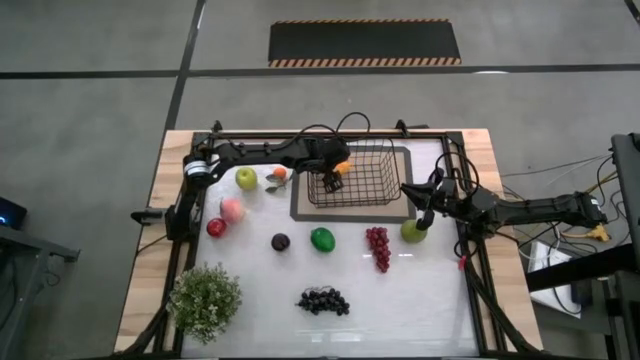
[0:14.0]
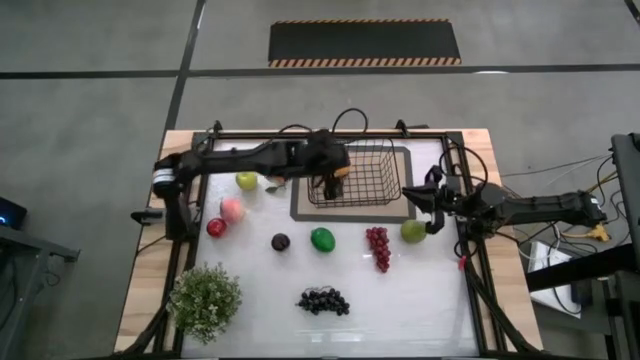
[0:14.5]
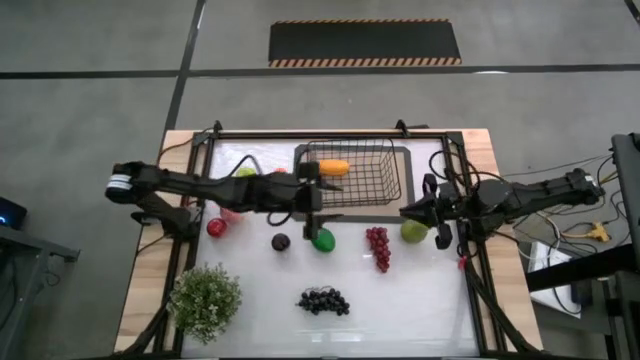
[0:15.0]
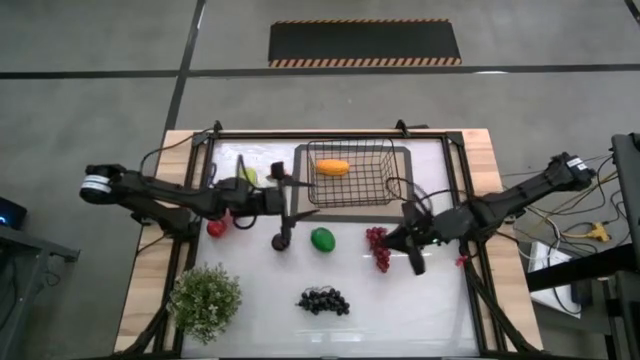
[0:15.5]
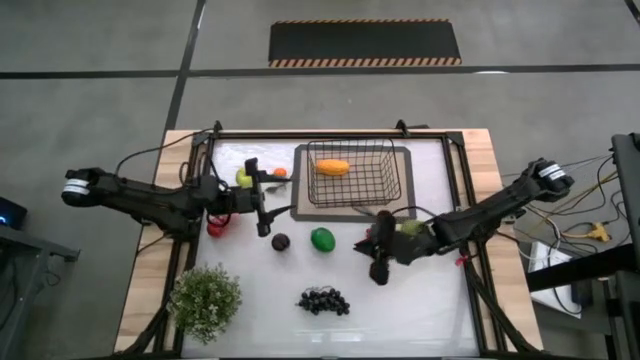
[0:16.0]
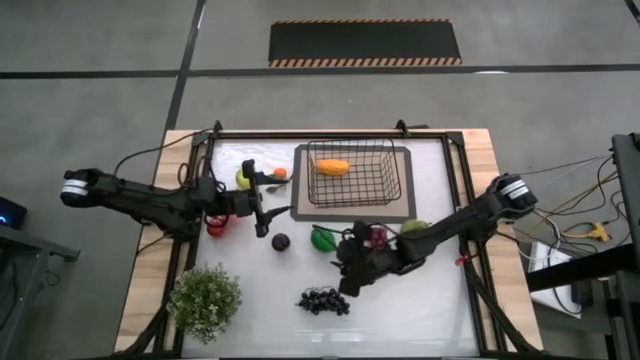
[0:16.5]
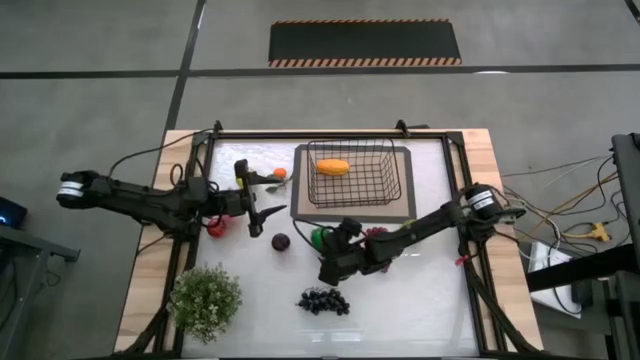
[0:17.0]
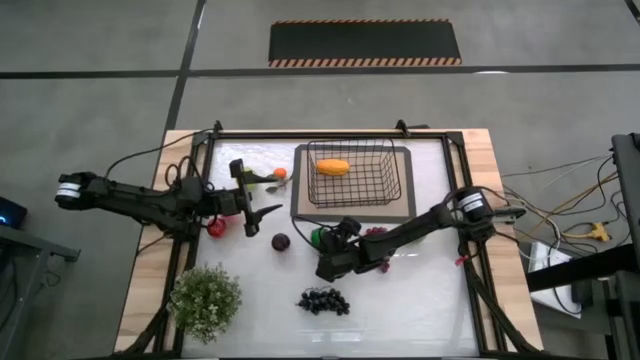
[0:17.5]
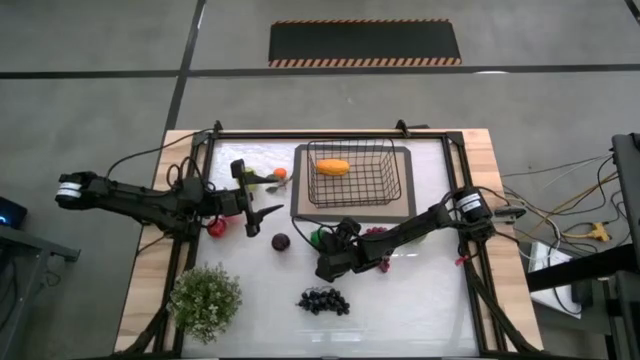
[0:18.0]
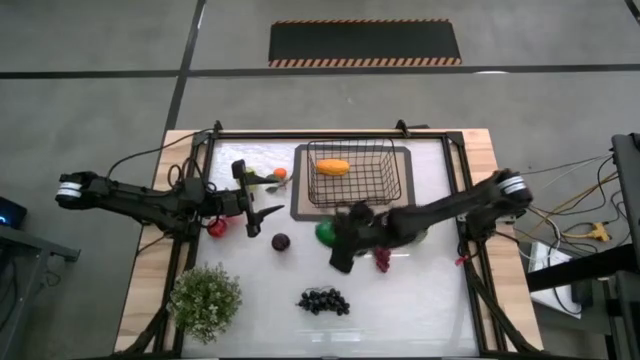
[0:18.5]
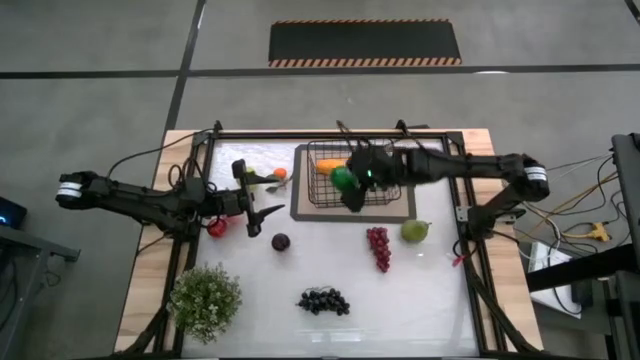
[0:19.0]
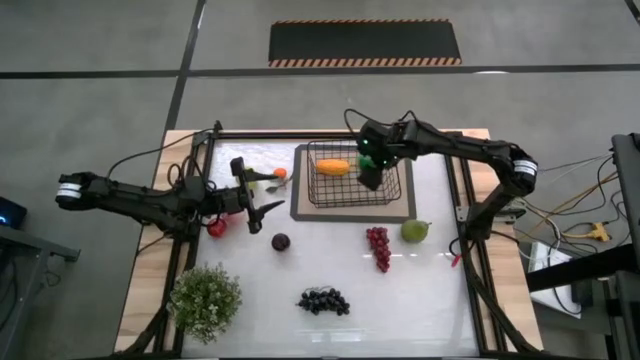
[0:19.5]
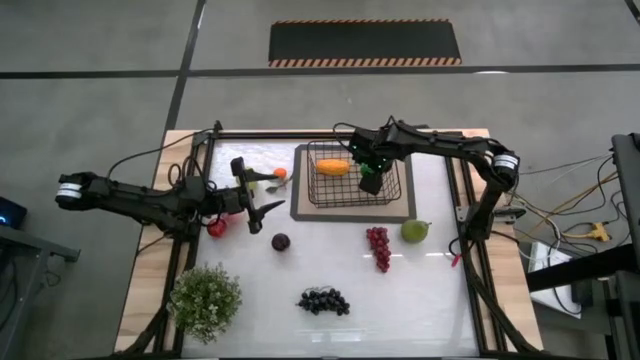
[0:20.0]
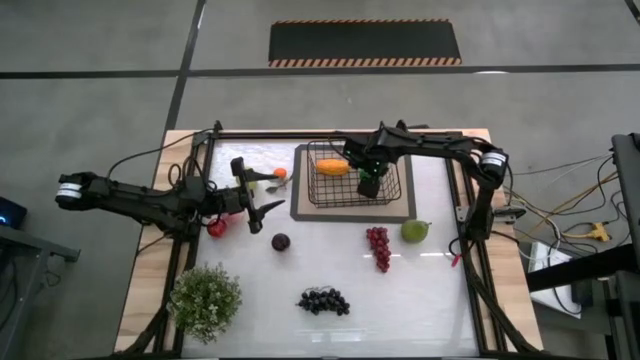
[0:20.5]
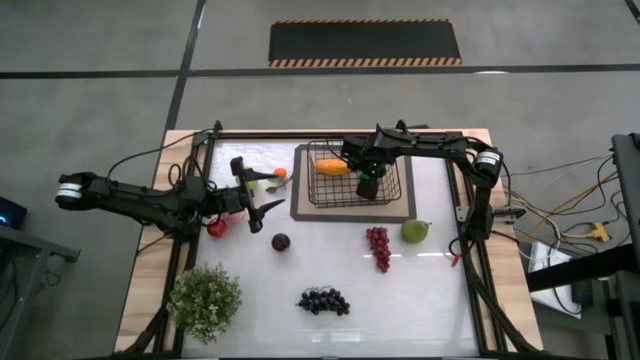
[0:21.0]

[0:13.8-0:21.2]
Task: Build produce basket
Put the green lime into the black wire basket

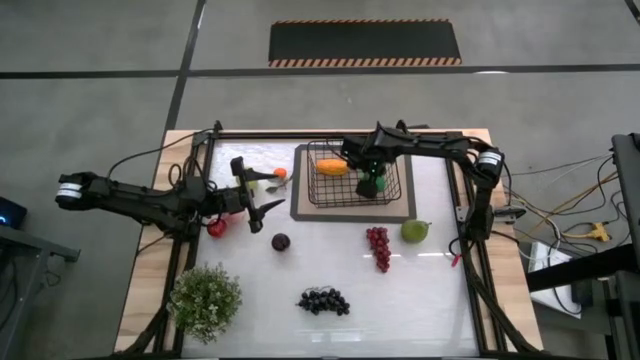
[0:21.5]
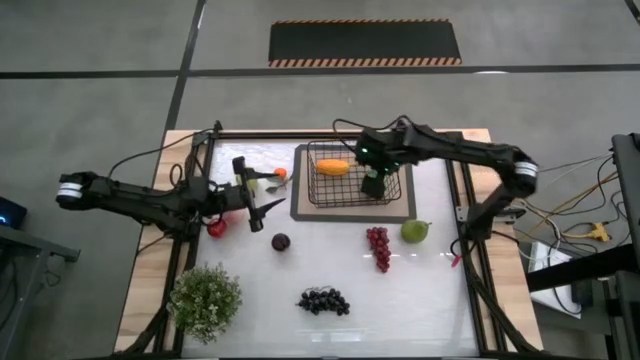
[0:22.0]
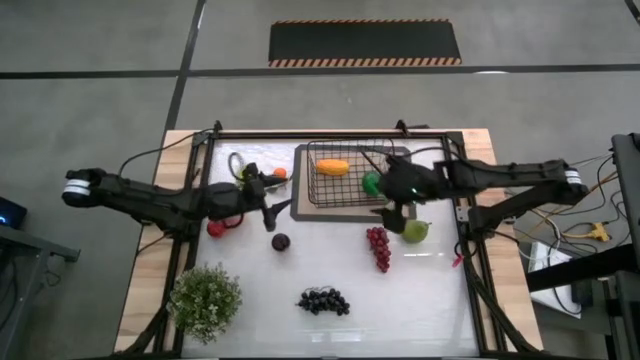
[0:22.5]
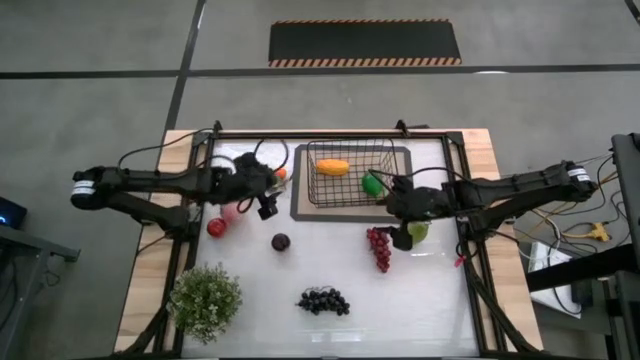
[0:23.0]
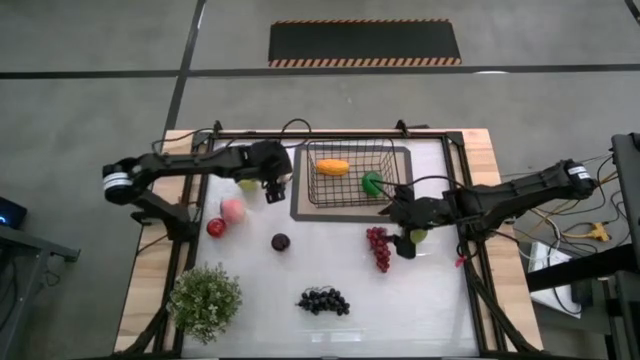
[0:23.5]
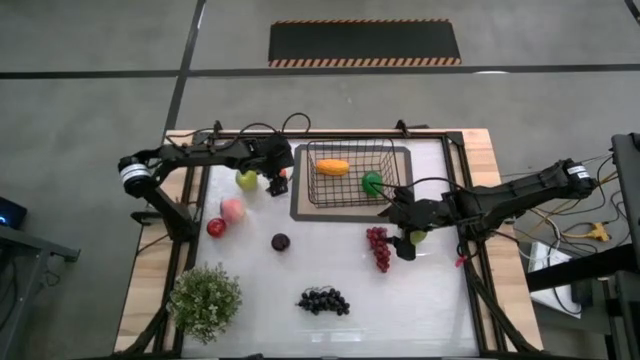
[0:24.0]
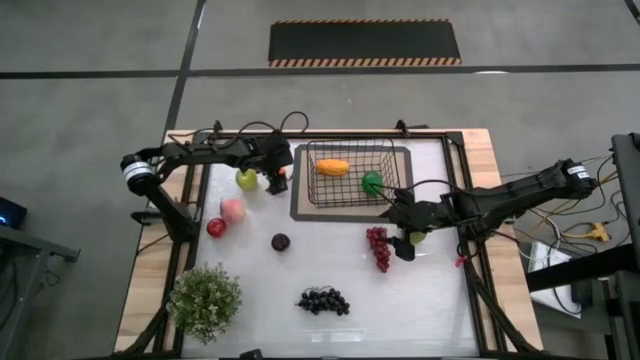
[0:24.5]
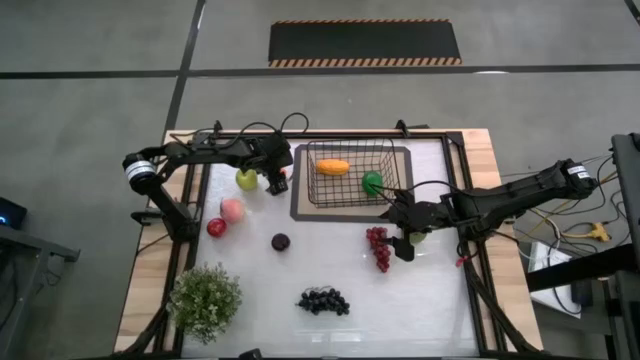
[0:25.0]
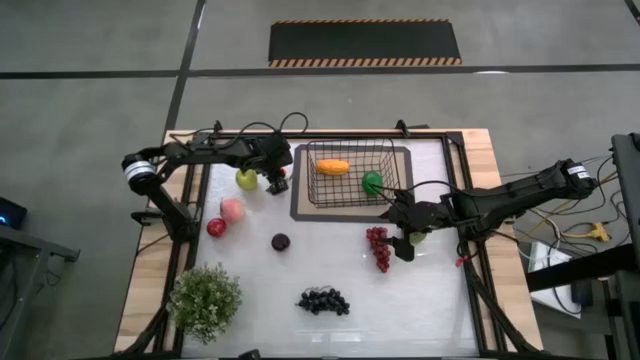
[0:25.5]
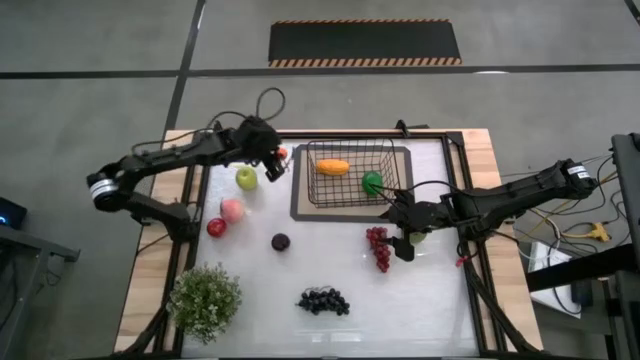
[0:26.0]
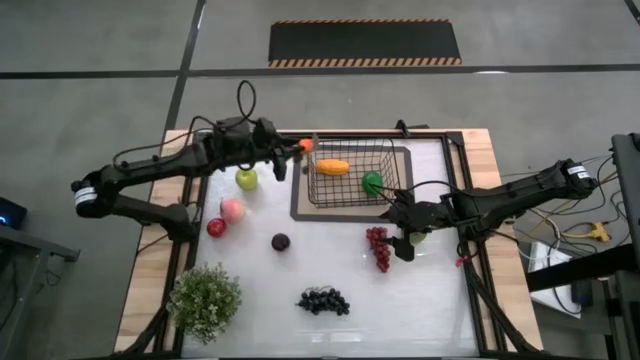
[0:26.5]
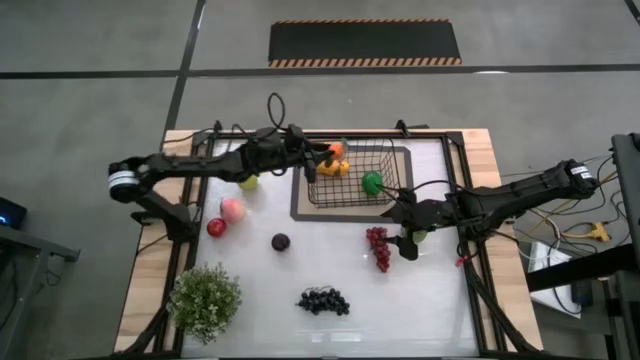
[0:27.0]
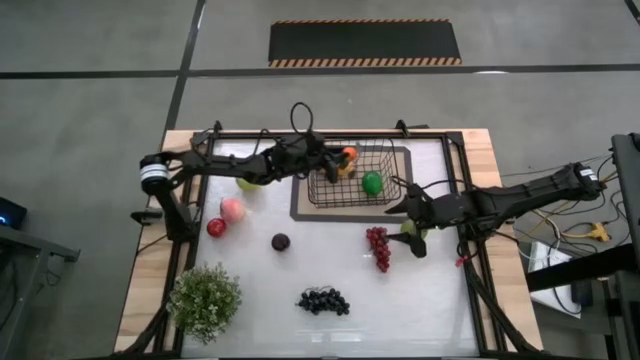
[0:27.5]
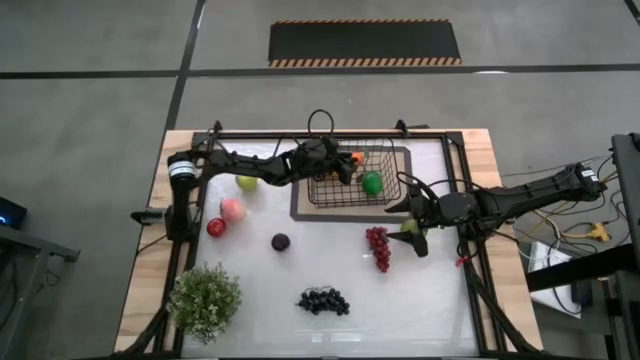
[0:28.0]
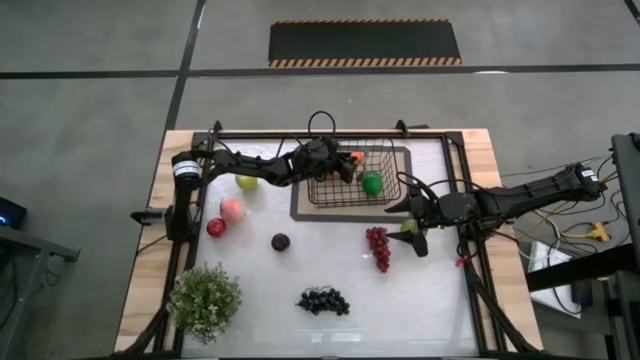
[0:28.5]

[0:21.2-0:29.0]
Put the orange tangerine into the black wire basket

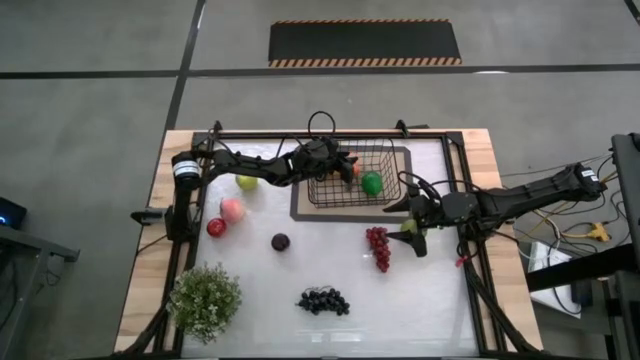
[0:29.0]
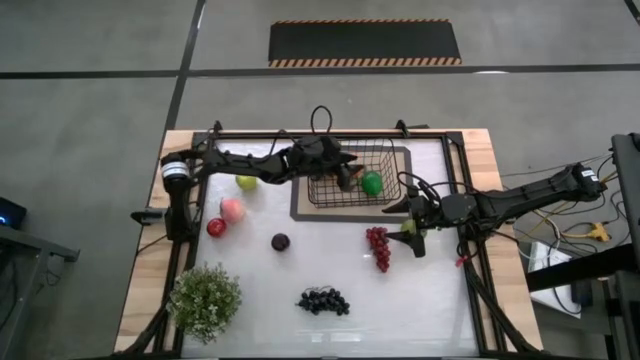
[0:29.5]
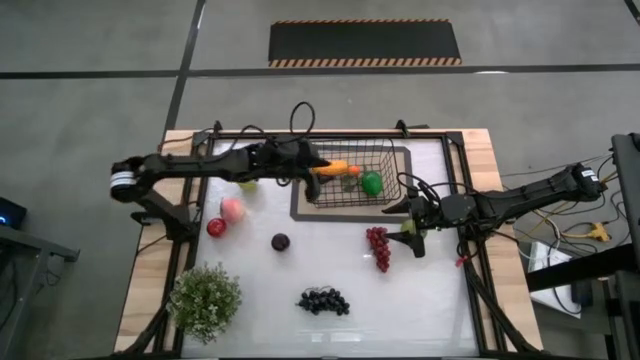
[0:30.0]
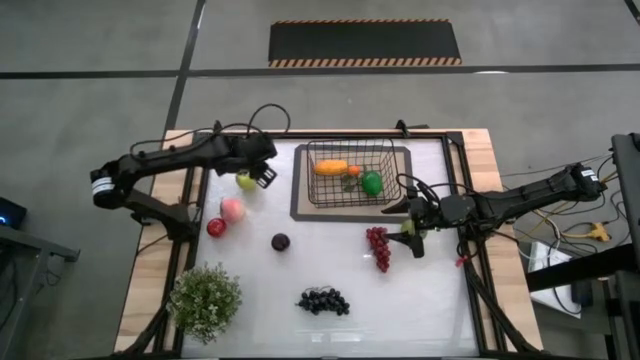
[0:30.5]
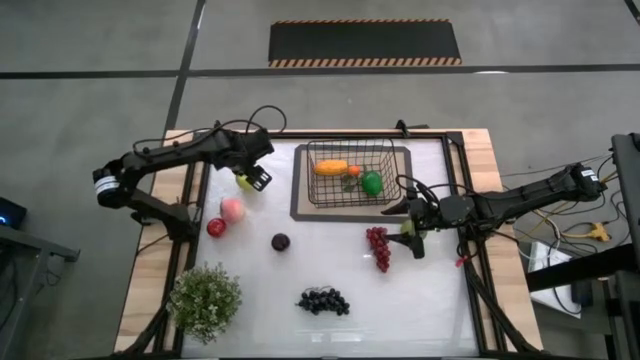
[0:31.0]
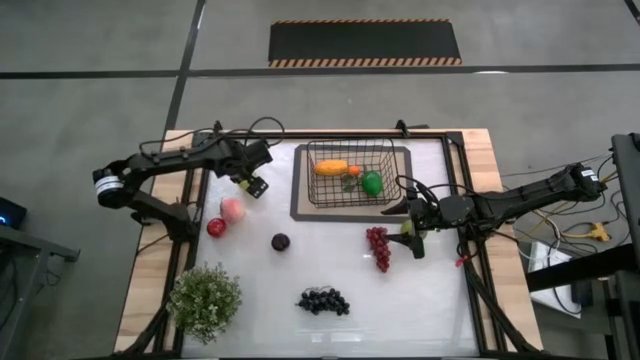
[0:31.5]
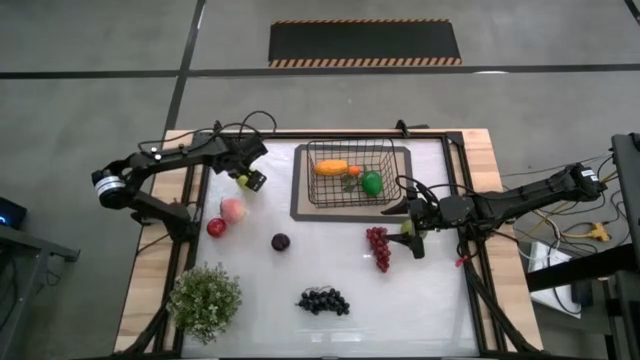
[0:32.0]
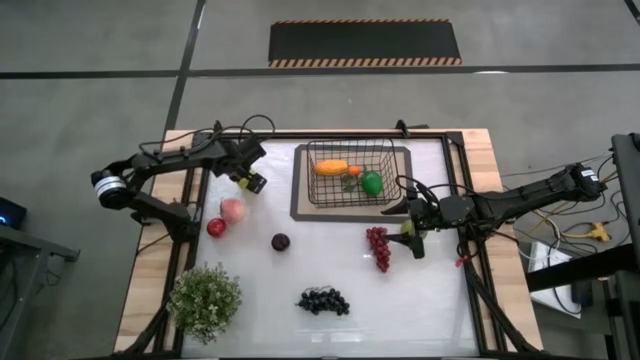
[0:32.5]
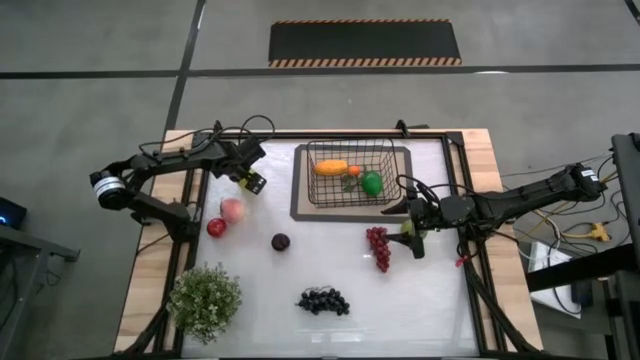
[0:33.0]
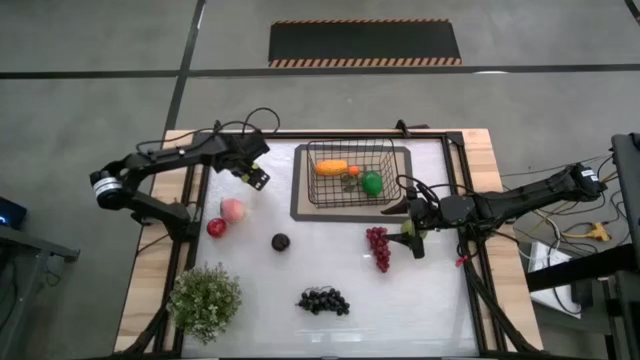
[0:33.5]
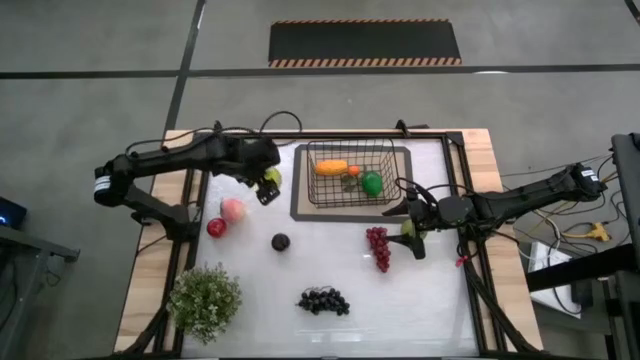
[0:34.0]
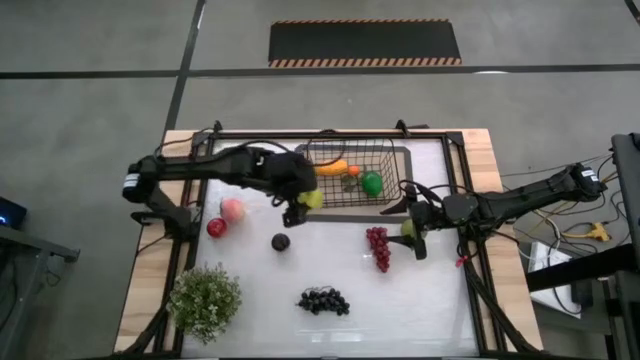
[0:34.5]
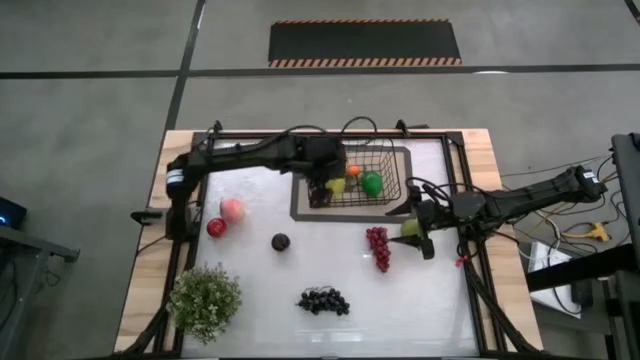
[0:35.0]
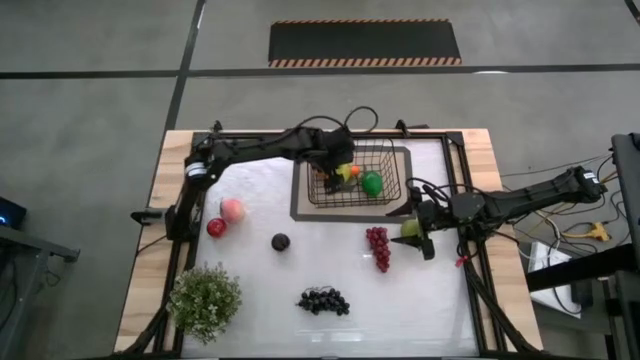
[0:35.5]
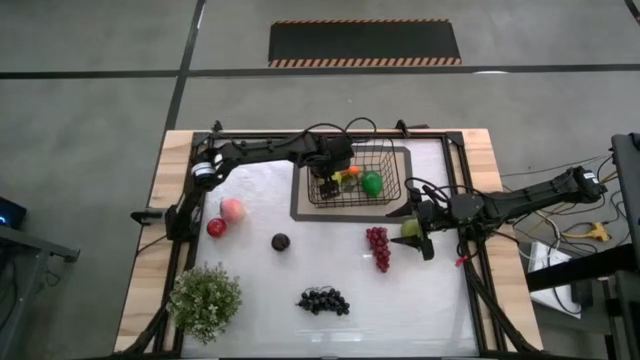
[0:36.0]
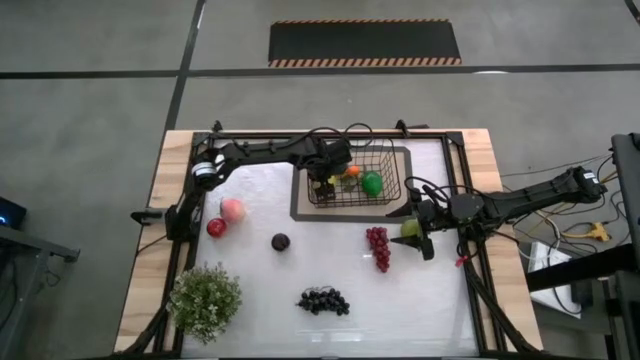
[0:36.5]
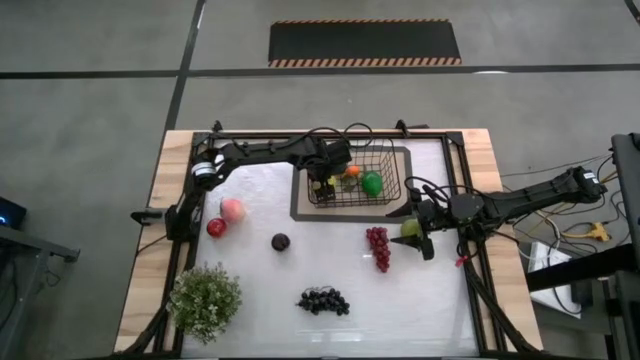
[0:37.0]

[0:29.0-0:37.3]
Put the green apple into the black wire basket
